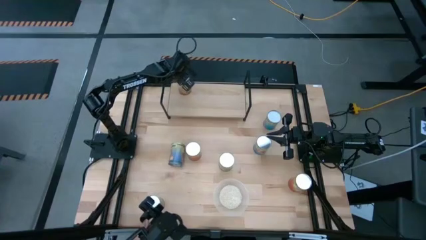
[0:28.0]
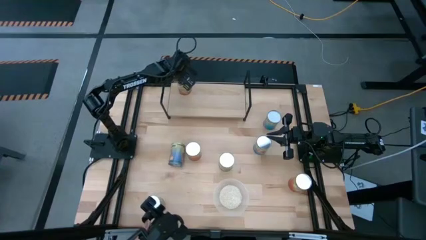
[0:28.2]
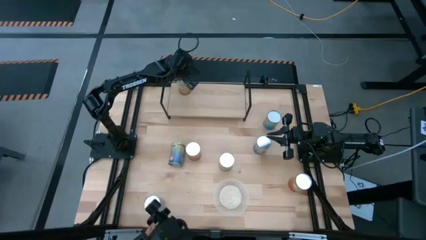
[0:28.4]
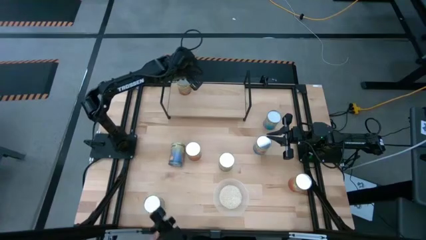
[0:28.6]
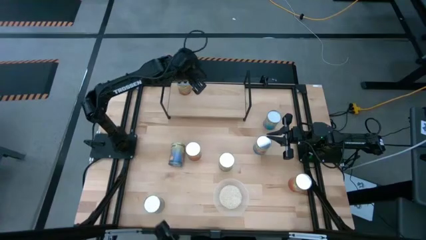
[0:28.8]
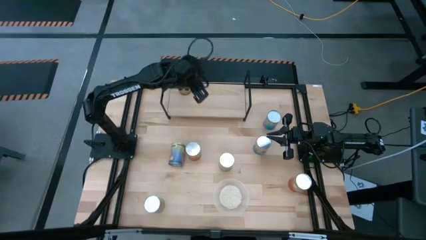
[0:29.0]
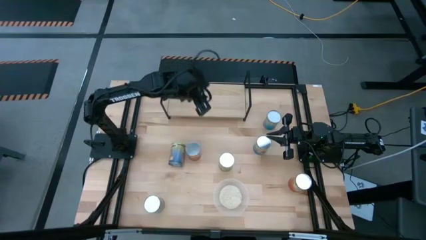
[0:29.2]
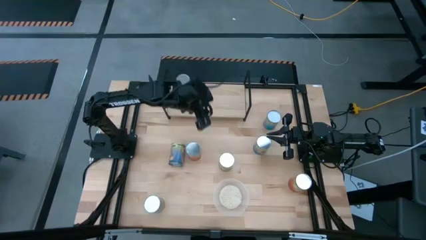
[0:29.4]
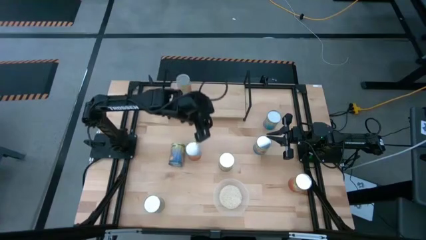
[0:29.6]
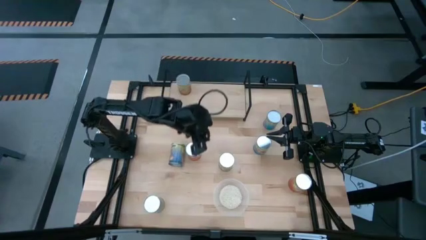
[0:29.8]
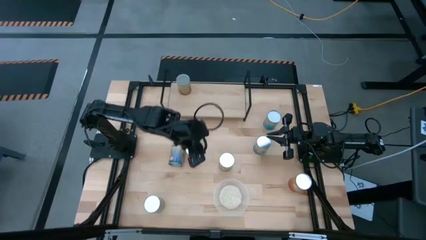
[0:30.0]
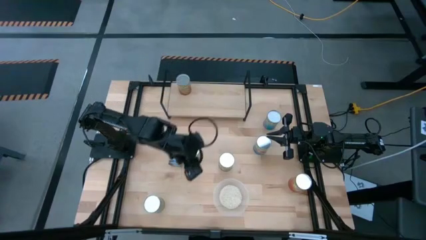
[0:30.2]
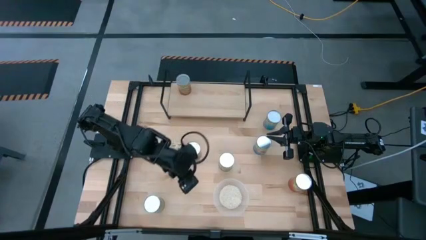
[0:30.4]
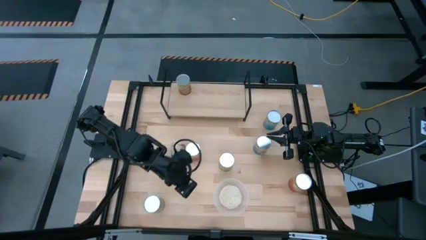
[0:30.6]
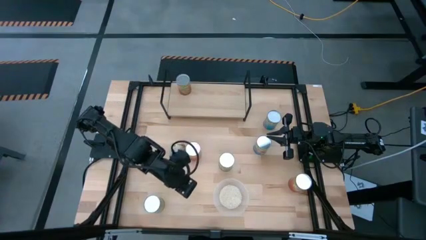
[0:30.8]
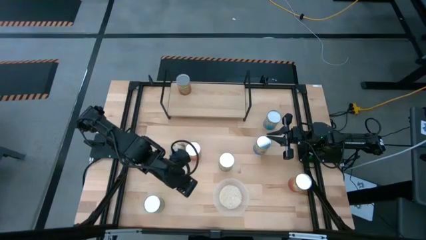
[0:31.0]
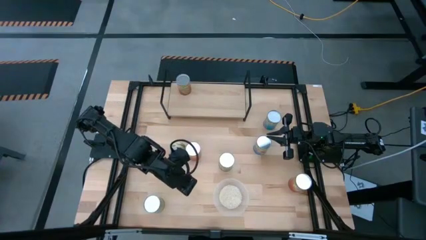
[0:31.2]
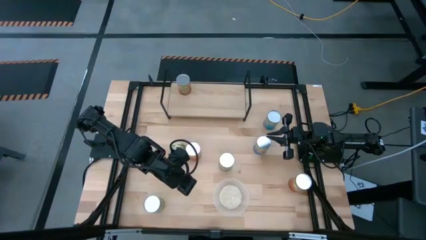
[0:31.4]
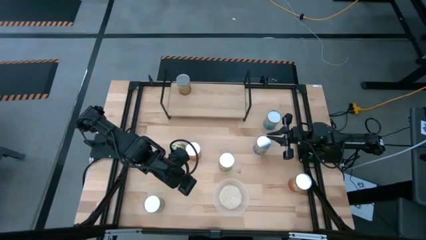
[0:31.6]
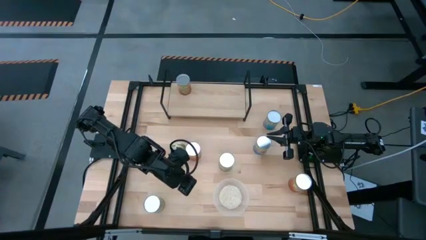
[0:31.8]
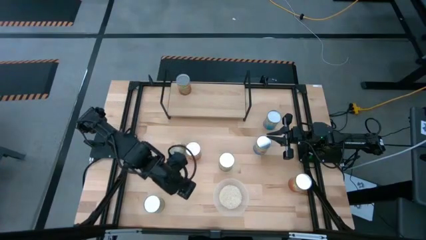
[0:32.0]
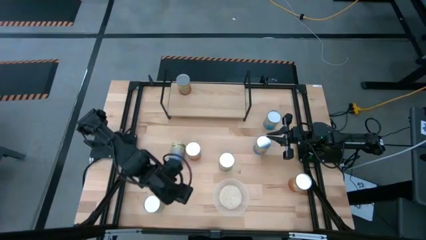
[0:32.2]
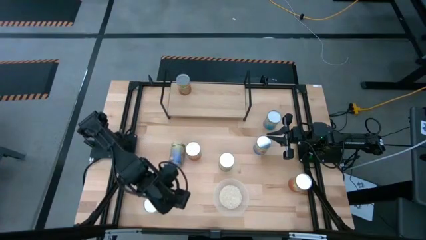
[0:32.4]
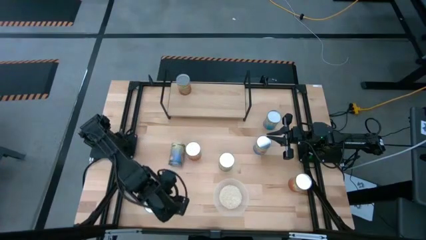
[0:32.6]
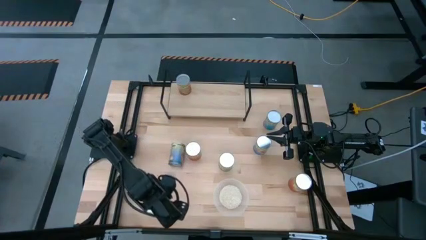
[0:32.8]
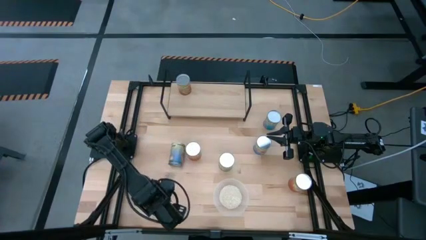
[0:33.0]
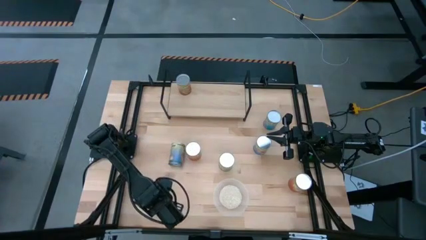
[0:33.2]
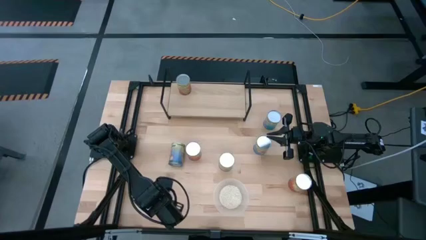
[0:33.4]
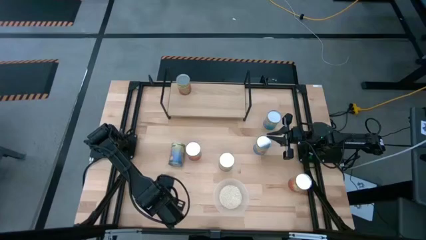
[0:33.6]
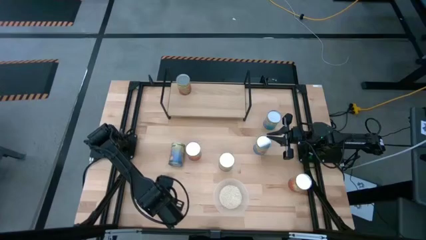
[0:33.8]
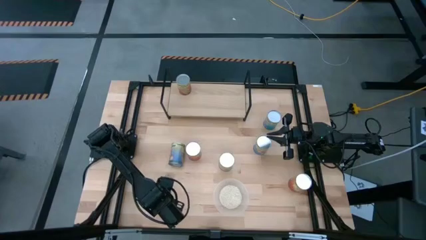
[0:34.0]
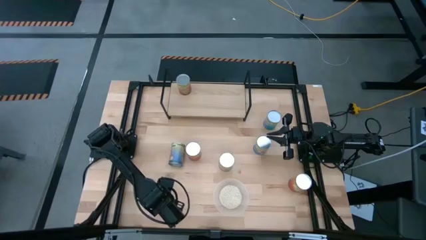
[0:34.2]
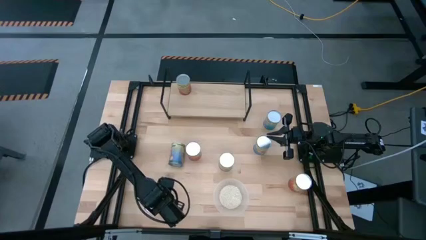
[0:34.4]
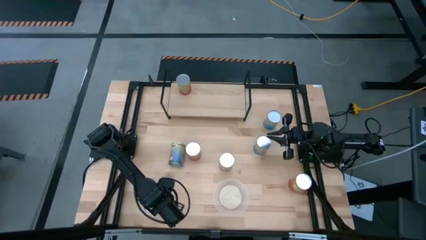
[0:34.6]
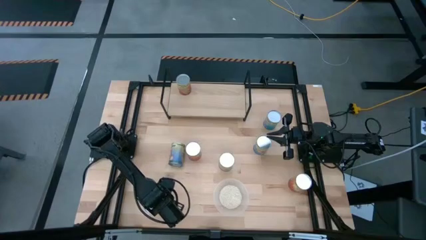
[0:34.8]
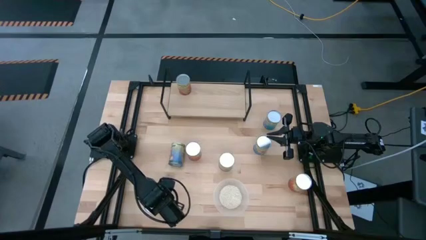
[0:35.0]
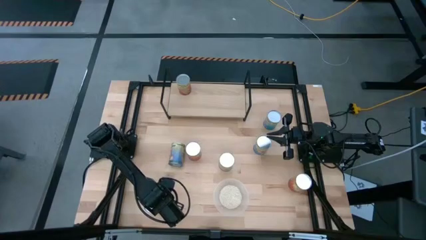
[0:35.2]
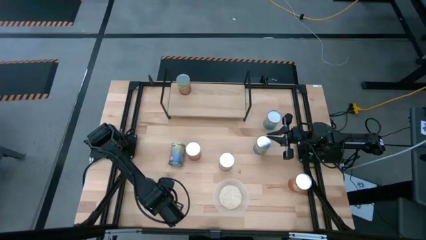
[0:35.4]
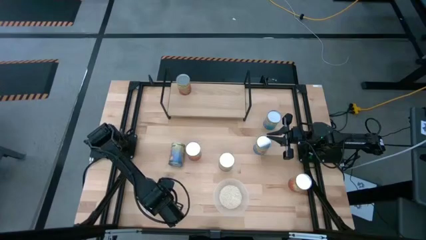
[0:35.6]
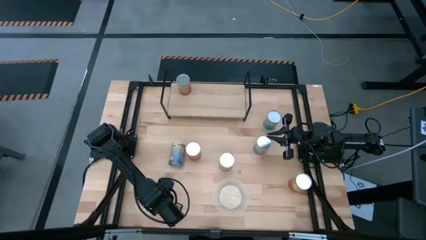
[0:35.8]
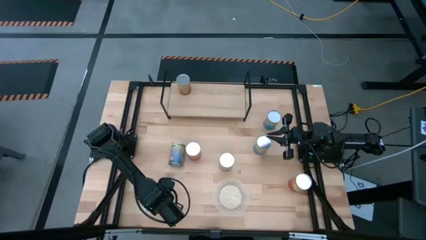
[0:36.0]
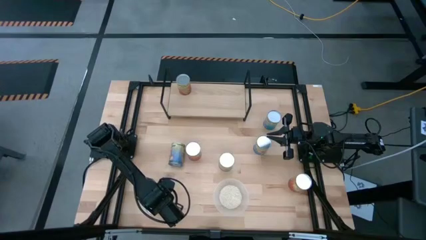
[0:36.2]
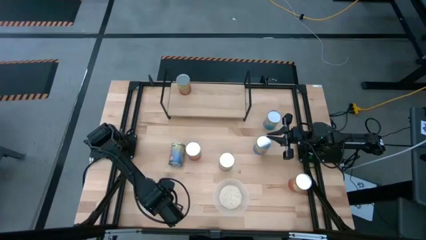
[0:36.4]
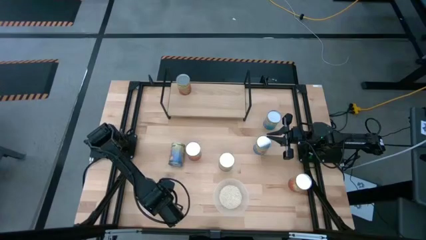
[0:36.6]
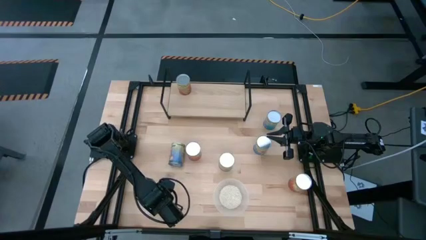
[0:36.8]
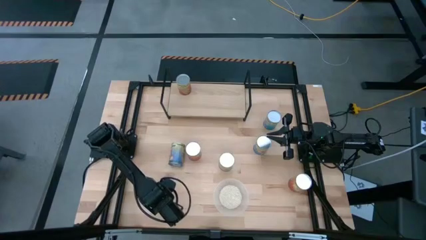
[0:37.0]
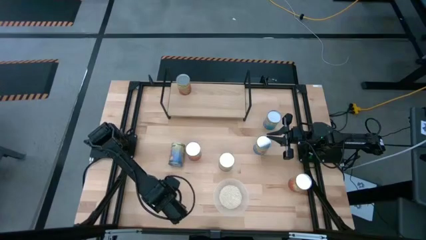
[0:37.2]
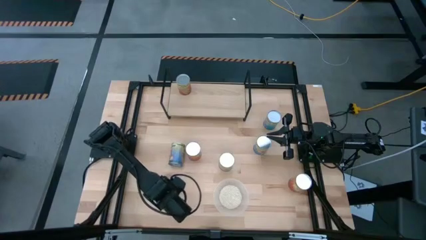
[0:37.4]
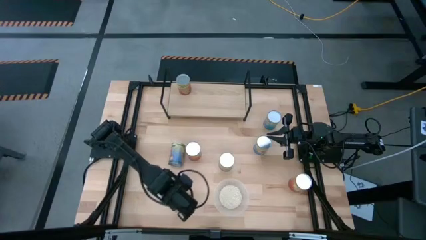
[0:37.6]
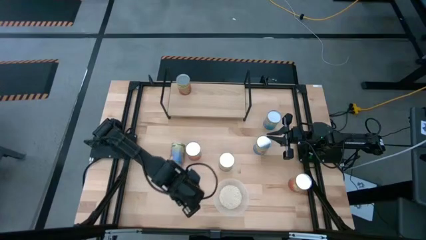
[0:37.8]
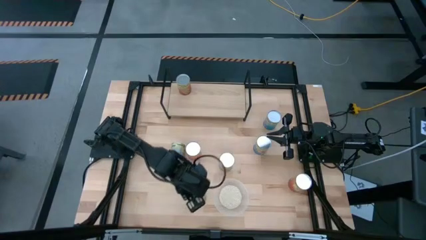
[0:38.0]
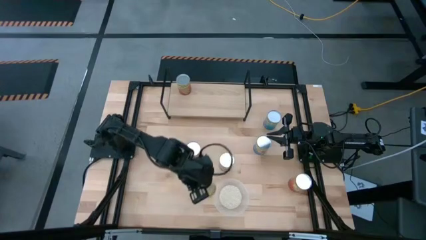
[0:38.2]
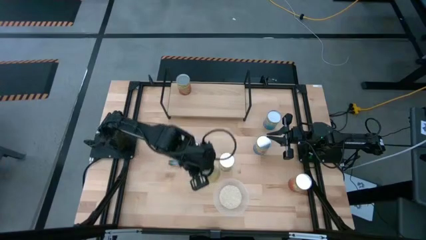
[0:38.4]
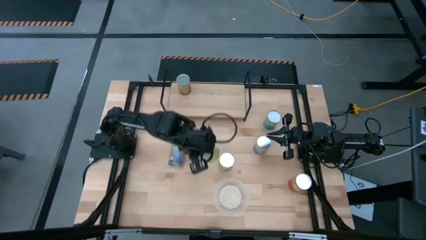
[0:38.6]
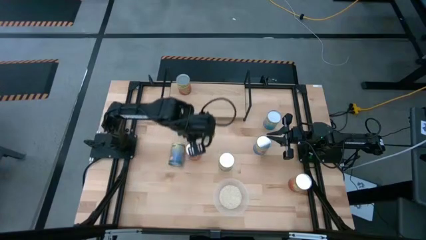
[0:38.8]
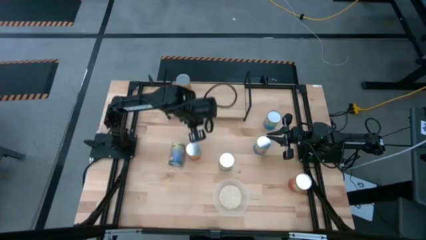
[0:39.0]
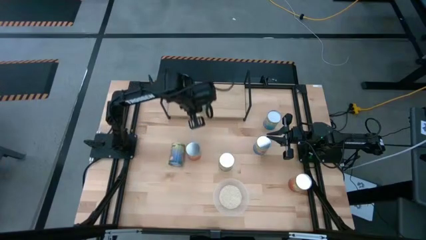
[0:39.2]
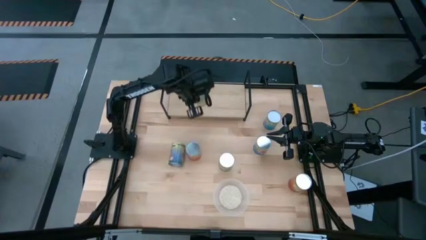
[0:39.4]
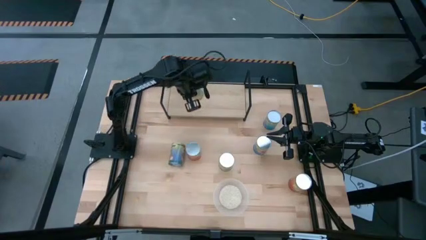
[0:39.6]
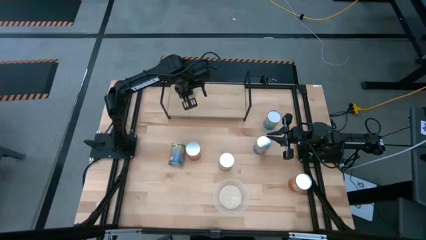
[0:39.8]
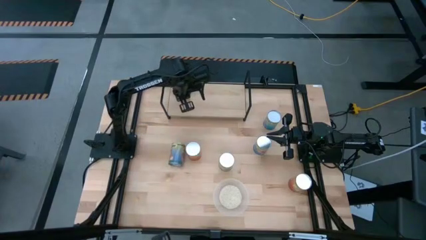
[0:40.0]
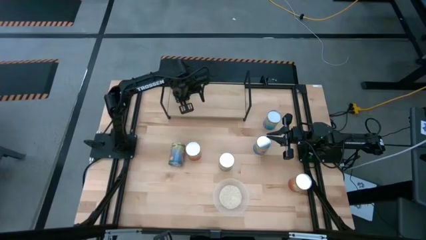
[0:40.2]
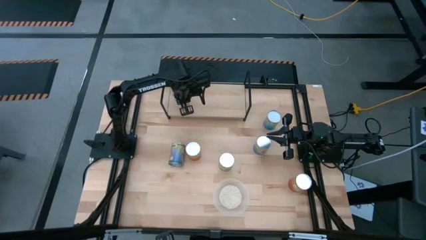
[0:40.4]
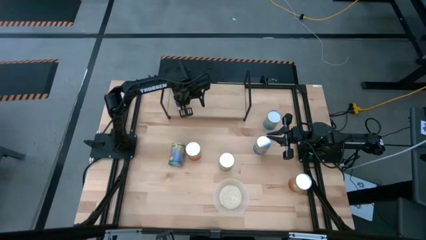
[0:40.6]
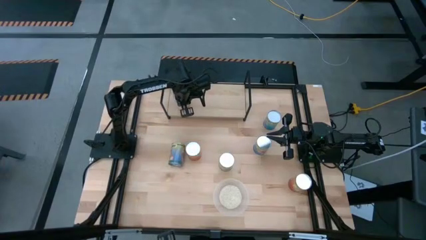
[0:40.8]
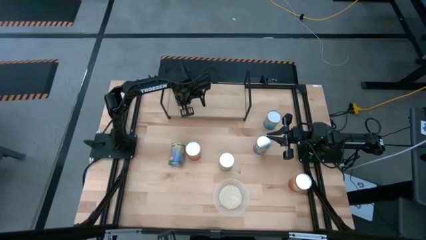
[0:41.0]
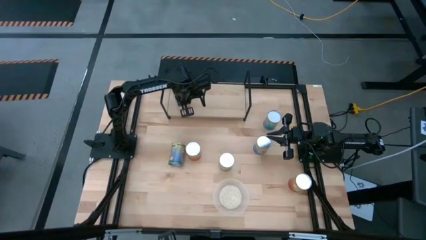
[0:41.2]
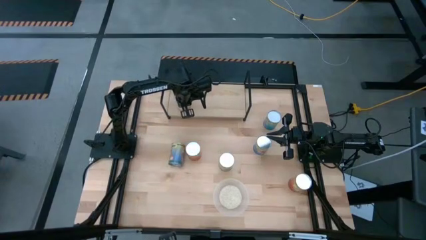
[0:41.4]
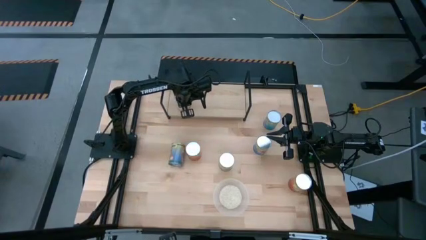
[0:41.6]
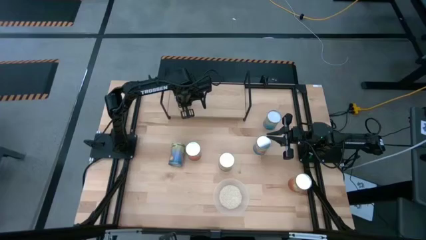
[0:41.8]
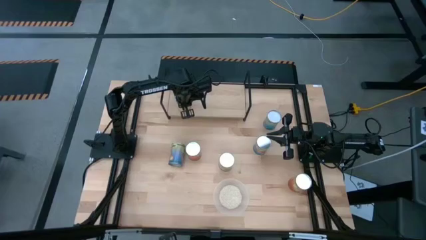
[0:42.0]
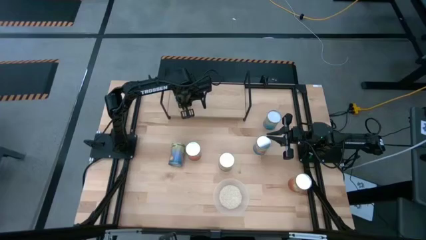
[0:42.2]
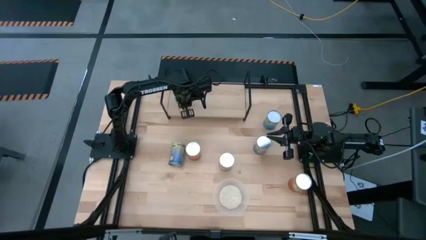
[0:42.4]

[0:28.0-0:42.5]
Task: Pick and place cans onto a shelf
Put the canned carrots on the shelf
